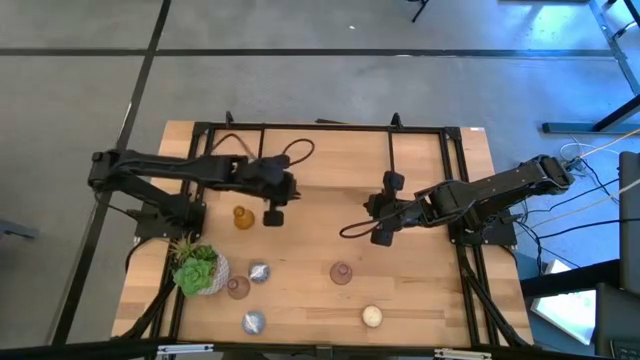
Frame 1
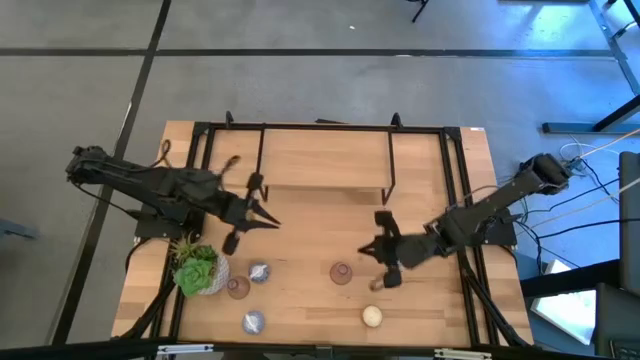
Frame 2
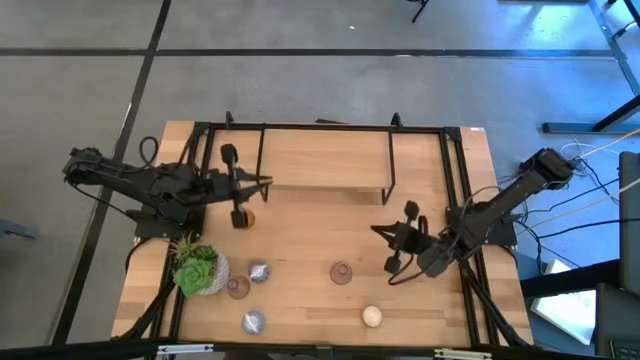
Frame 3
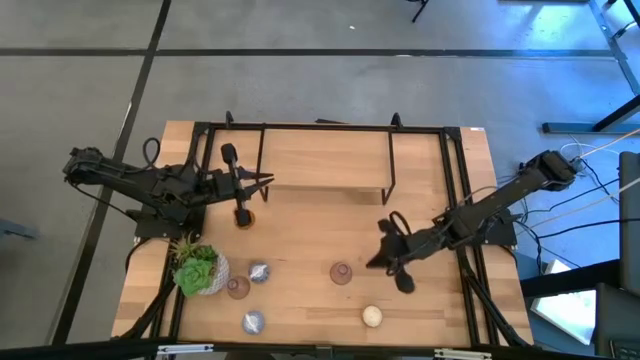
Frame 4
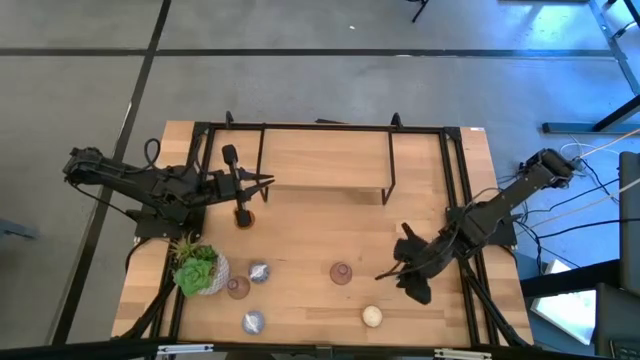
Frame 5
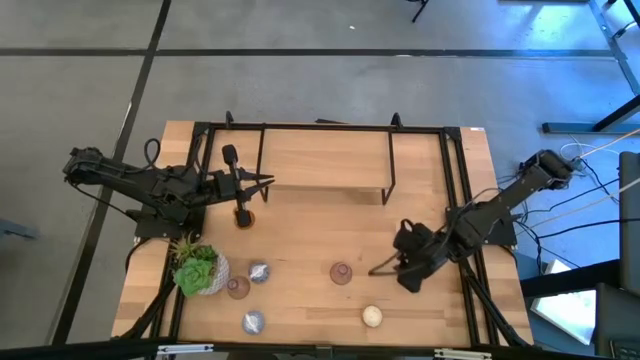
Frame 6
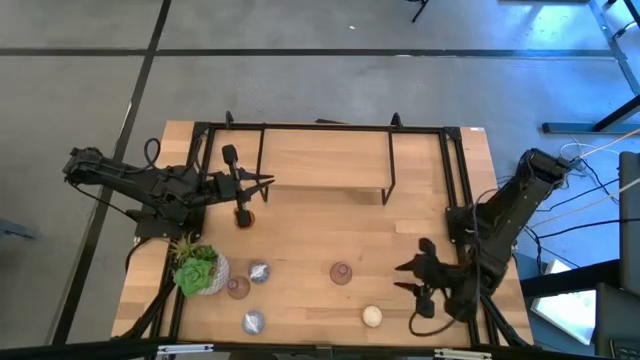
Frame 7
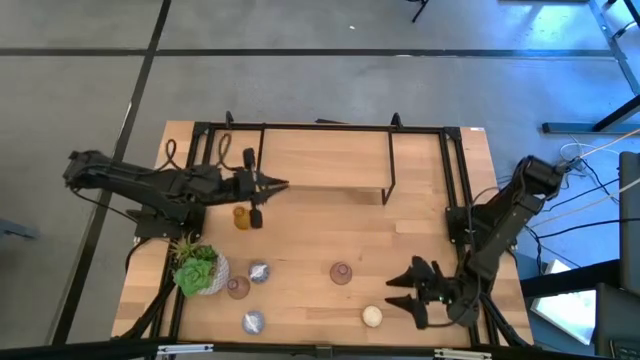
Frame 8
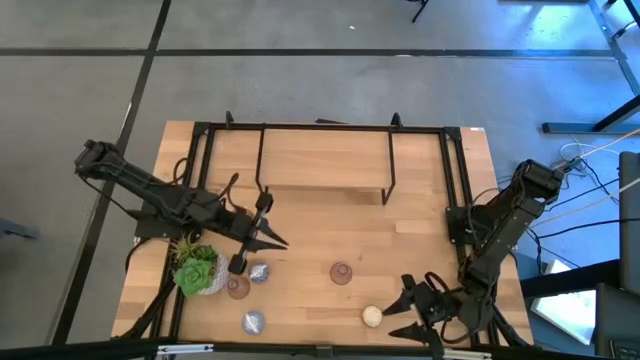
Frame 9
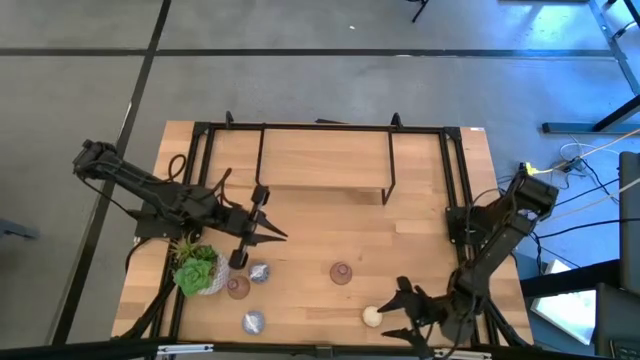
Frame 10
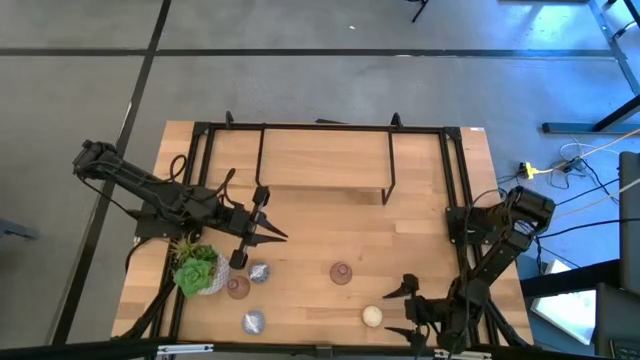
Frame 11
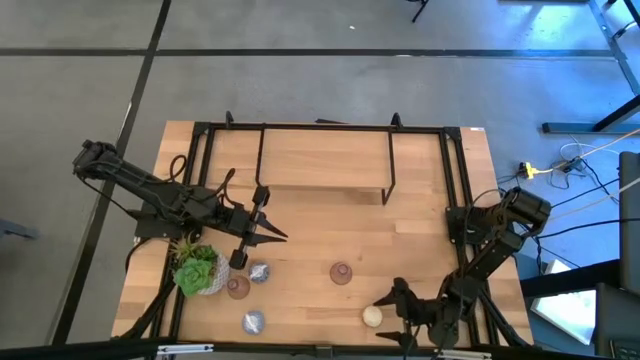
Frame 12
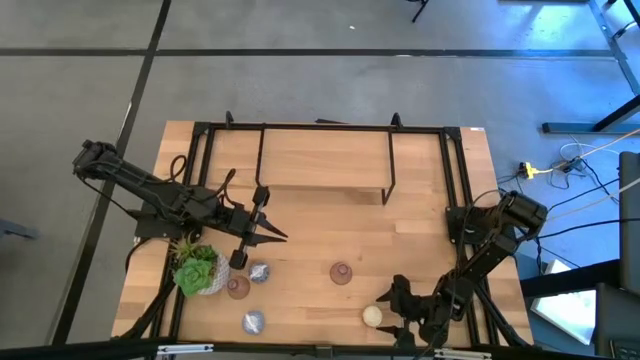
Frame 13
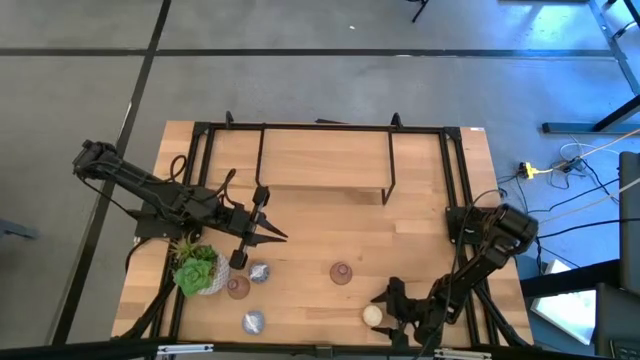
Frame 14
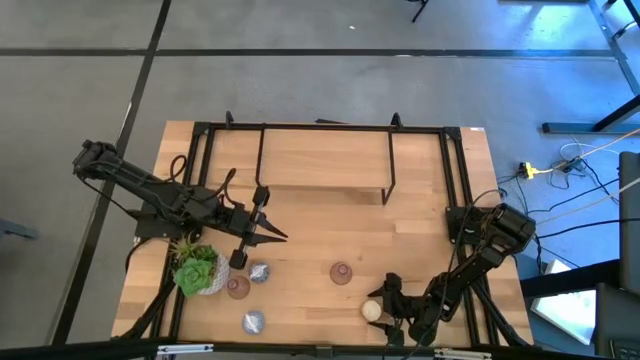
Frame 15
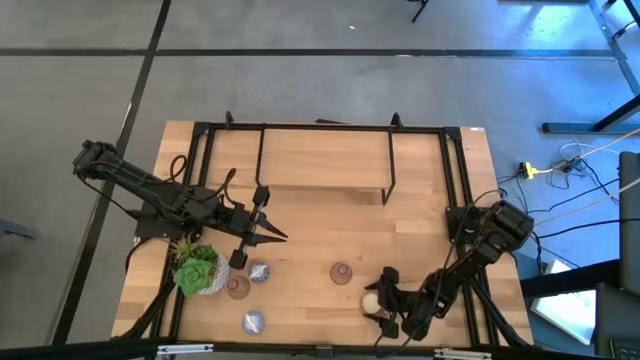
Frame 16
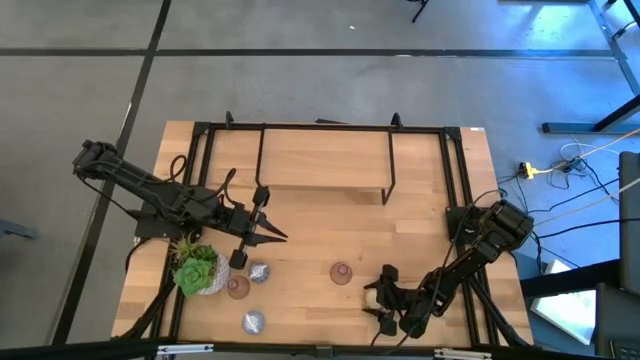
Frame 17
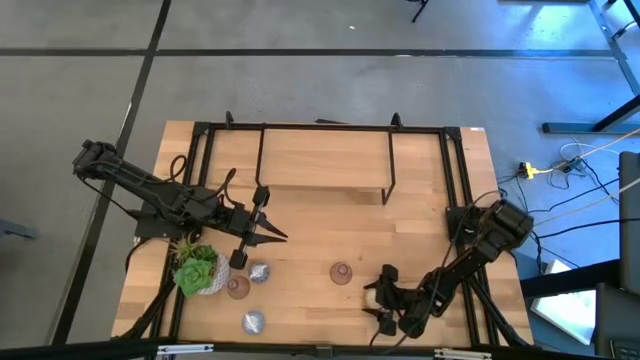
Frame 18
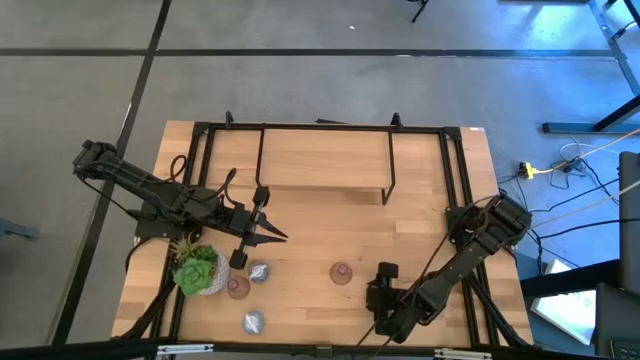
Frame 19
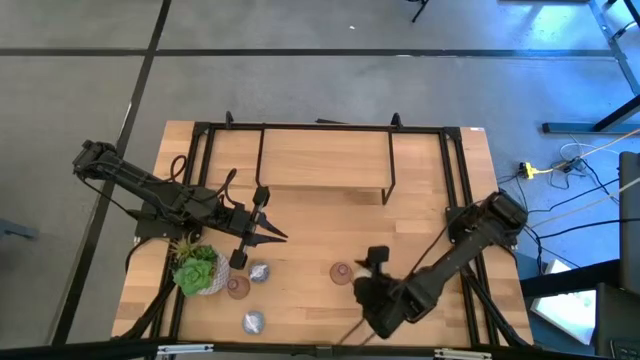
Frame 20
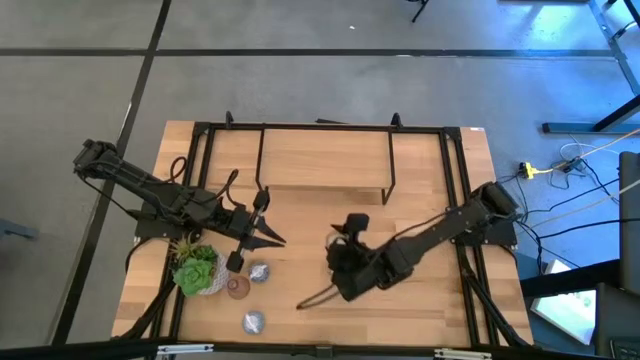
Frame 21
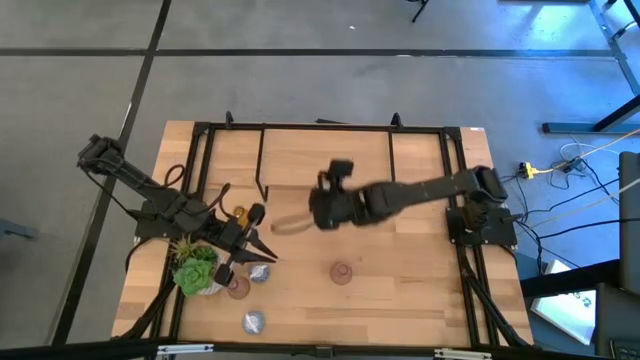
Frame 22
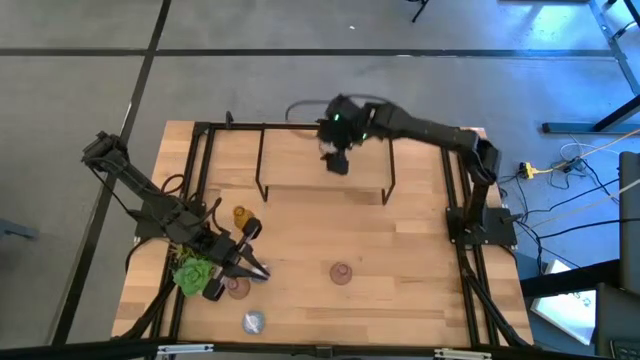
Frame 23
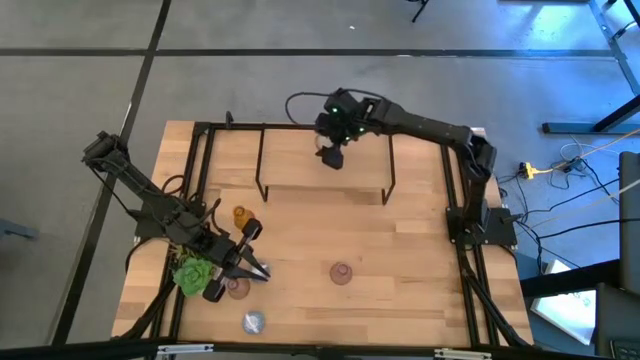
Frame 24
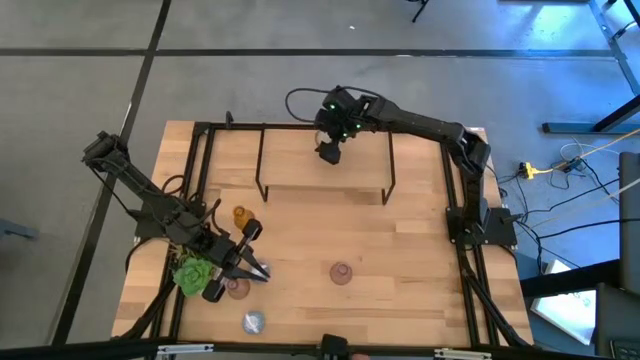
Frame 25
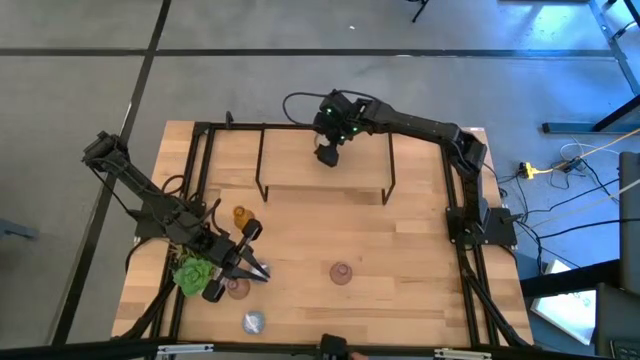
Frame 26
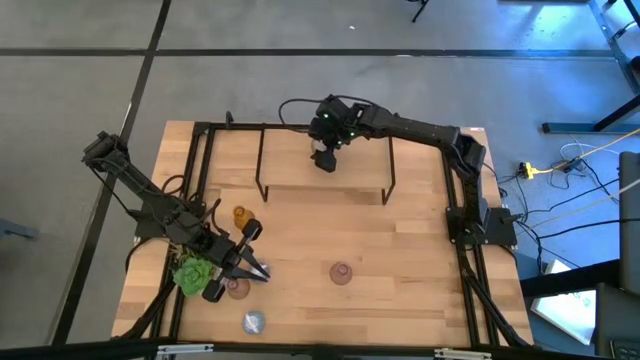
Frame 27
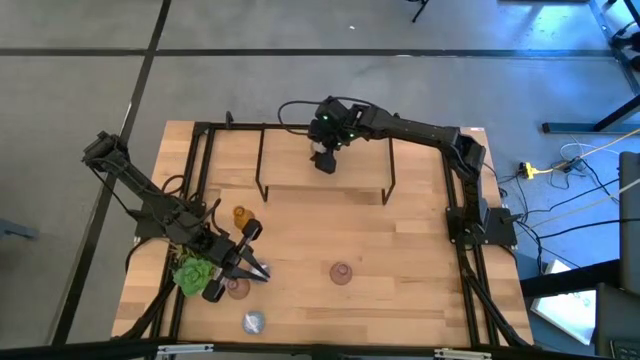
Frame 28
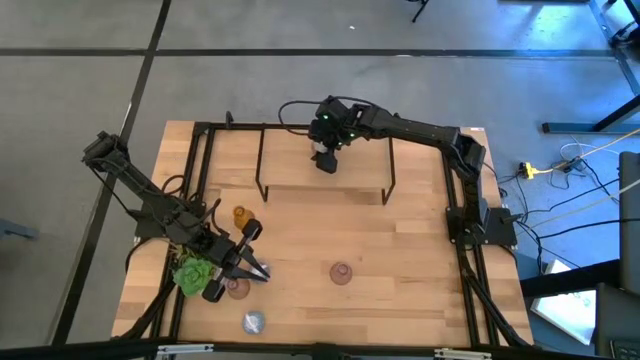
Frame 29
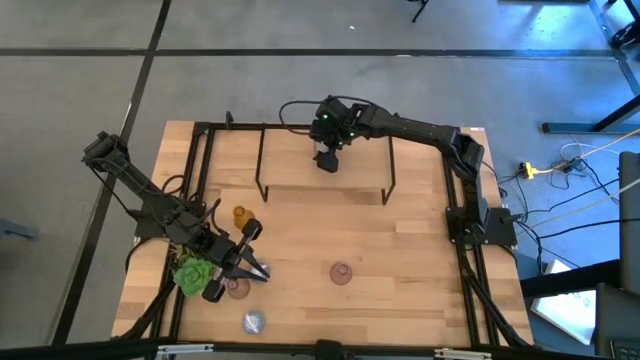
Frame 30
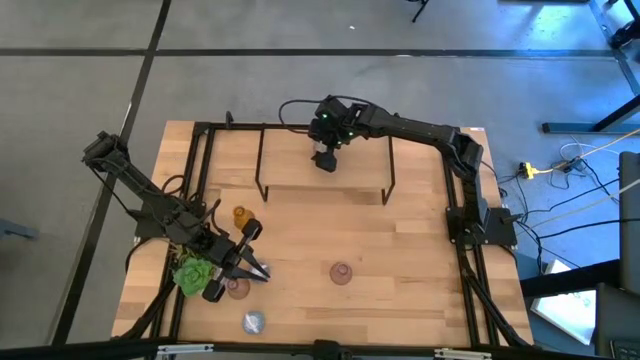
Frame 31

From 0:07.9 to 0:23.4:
Task: Pick & Place candle stick holders
Put the orange candle on the shelf

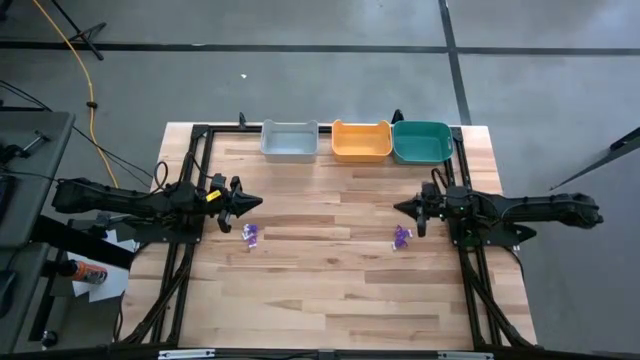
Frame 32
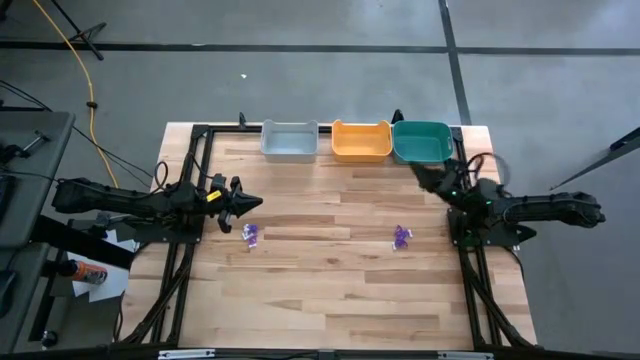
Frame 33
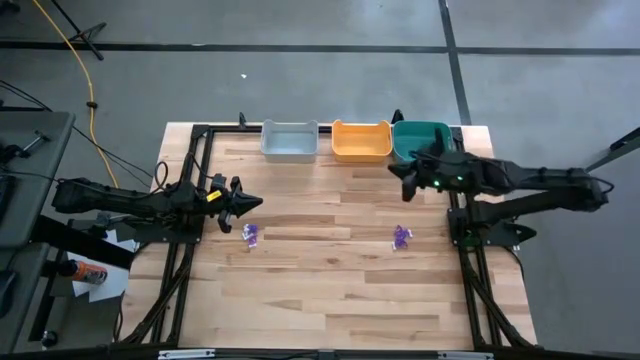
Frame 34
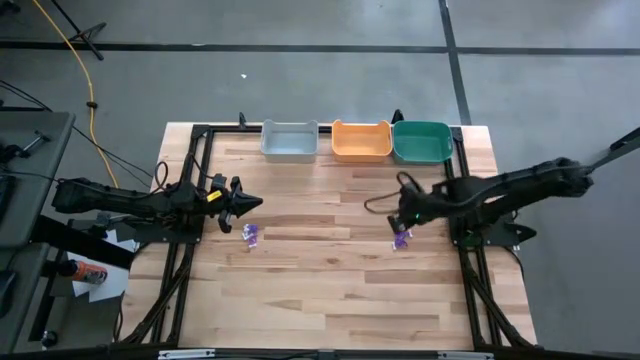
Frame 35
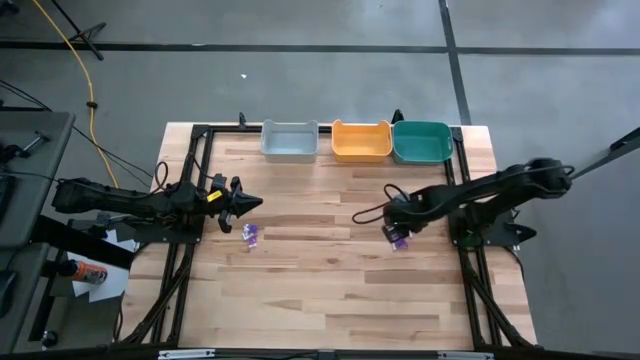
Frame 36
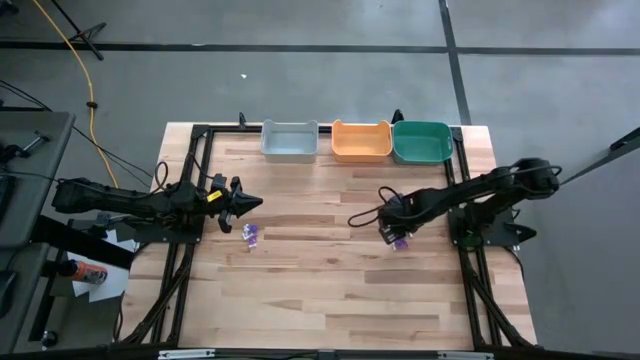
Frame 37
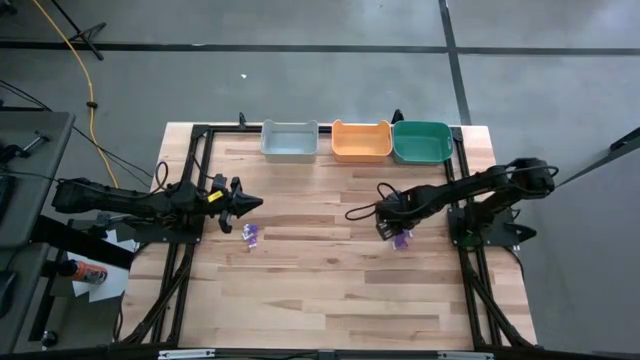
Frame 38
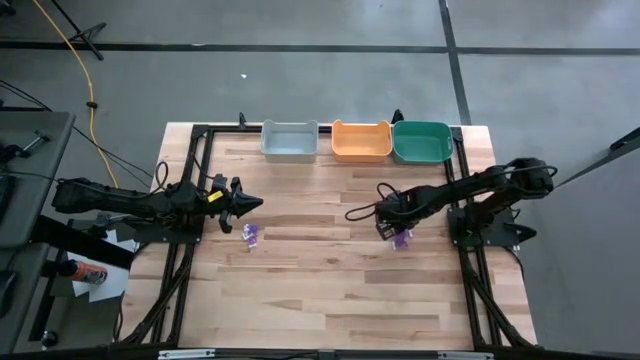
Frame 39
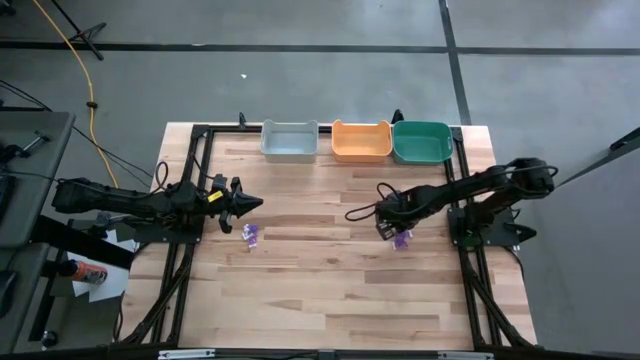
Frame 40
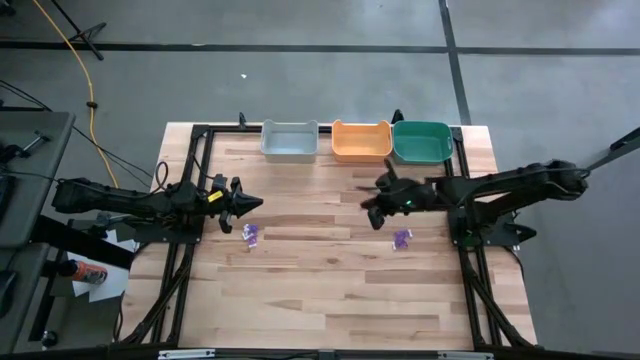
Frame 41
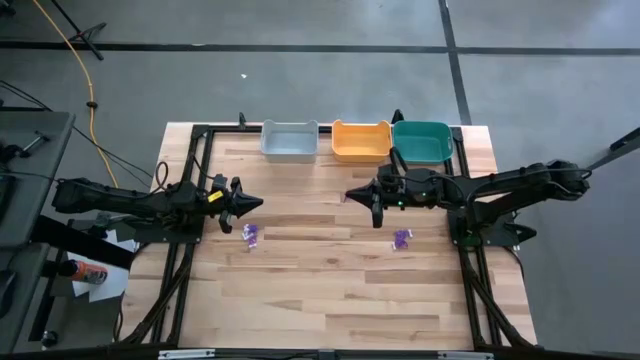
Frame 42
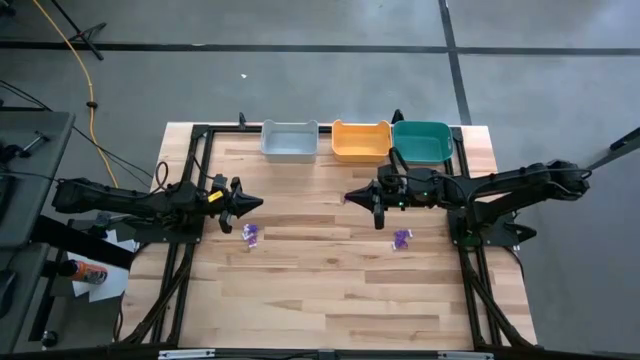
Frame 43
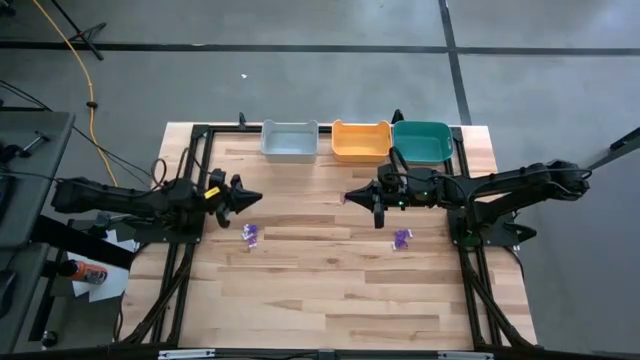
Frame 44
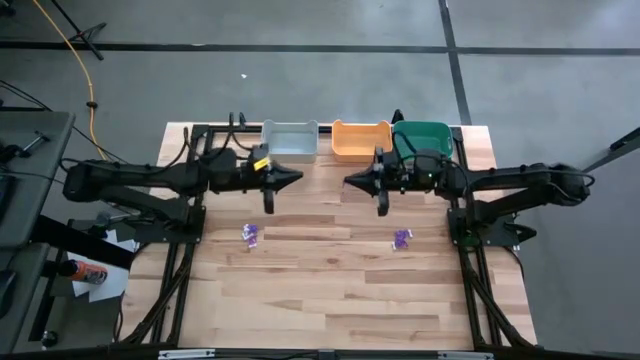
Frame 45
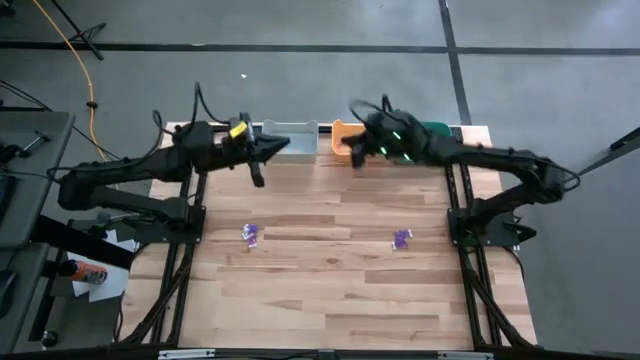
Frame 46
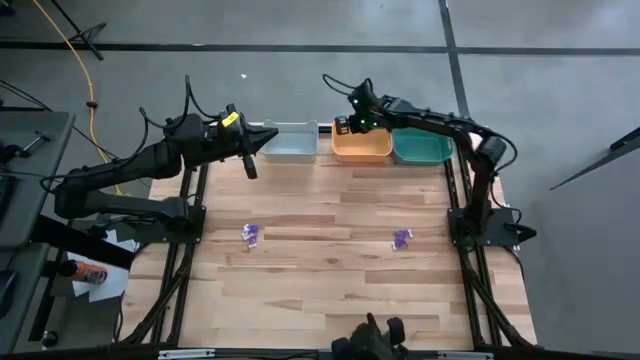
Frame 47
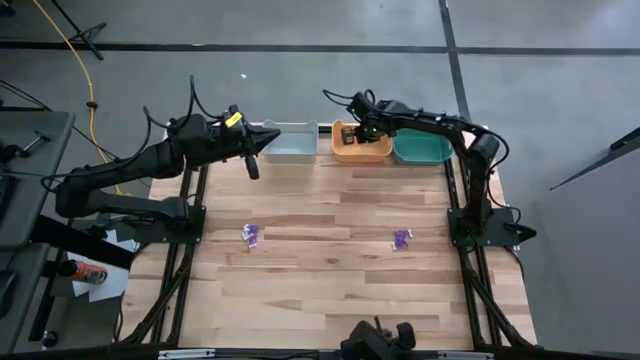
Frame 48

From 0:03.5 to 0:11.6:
Task: Sort Halloween decoration
Put the purple witch hat toy into the orange bin
